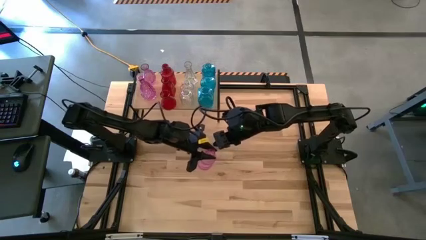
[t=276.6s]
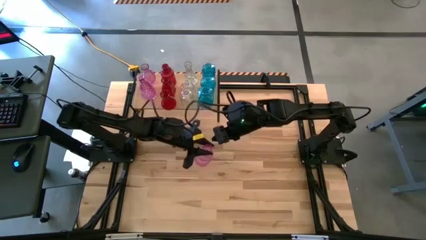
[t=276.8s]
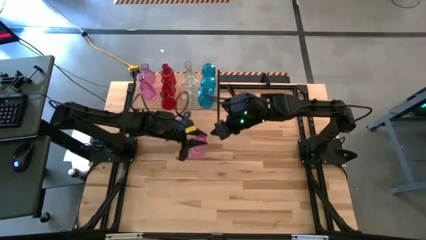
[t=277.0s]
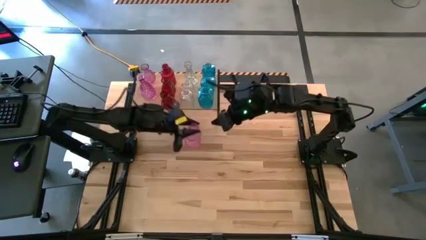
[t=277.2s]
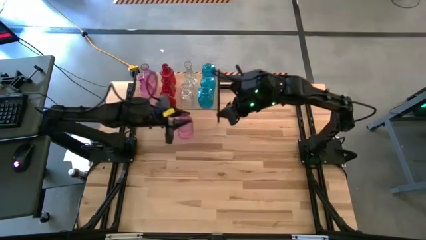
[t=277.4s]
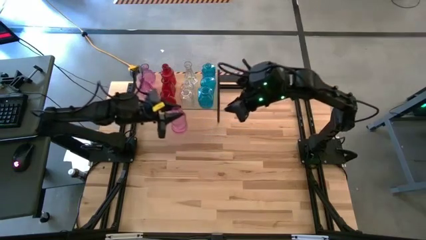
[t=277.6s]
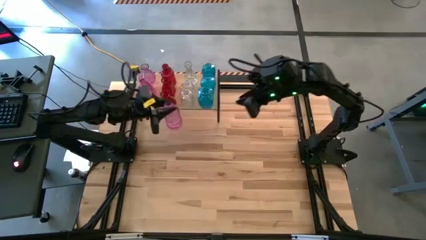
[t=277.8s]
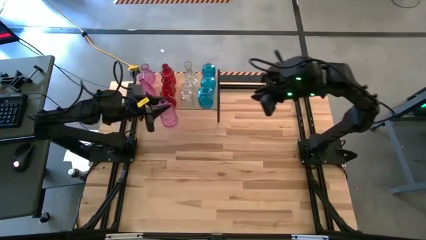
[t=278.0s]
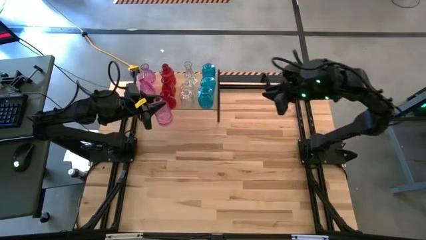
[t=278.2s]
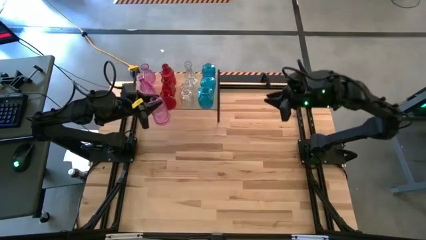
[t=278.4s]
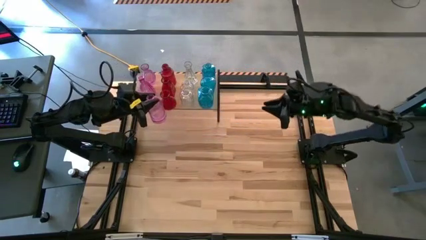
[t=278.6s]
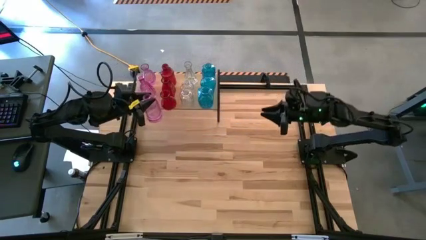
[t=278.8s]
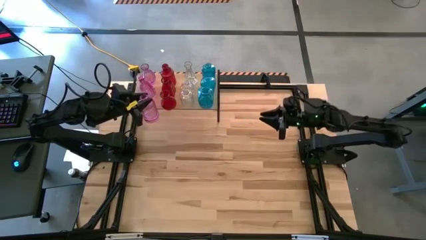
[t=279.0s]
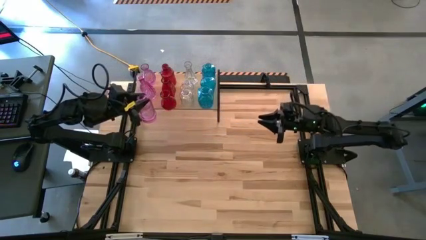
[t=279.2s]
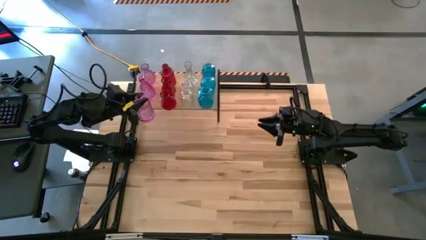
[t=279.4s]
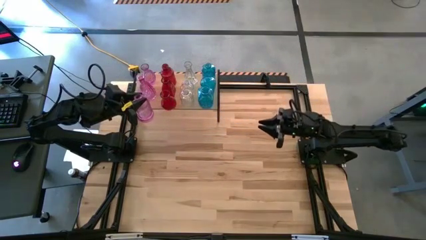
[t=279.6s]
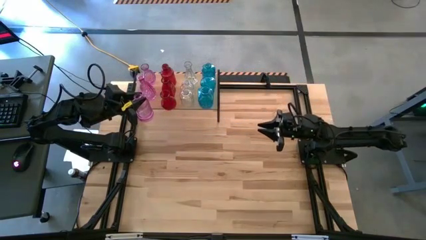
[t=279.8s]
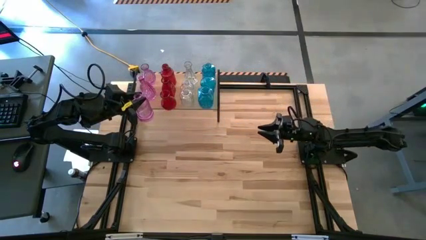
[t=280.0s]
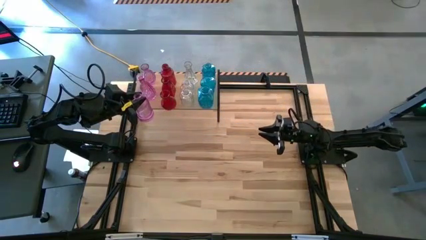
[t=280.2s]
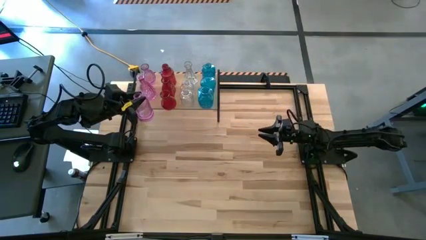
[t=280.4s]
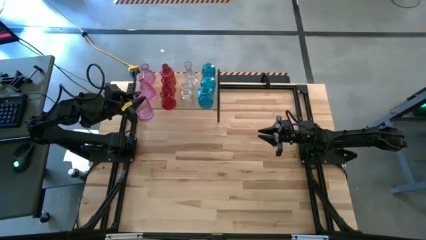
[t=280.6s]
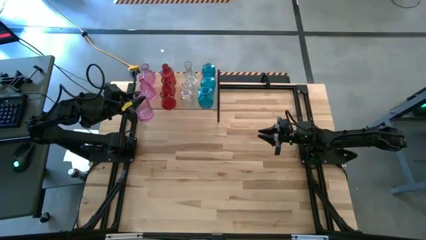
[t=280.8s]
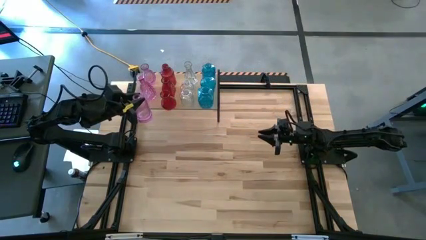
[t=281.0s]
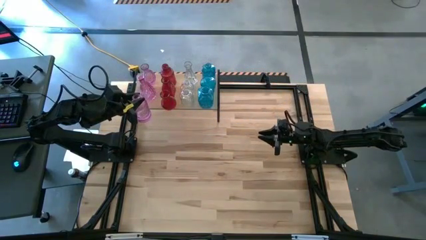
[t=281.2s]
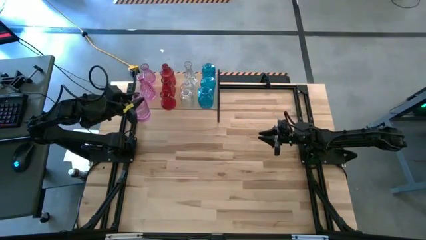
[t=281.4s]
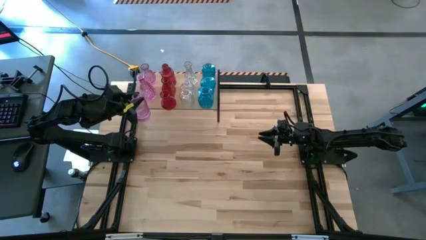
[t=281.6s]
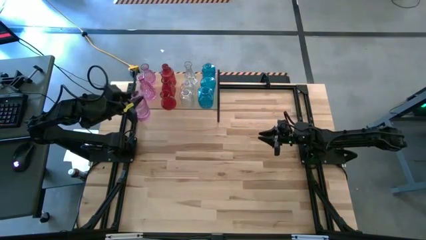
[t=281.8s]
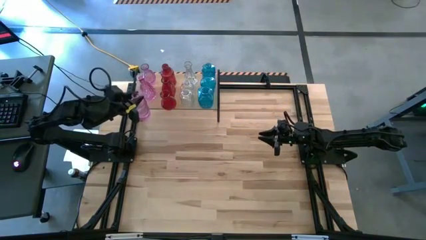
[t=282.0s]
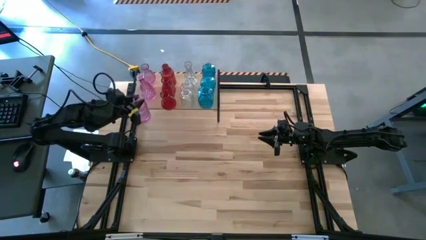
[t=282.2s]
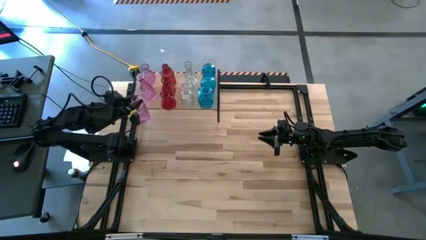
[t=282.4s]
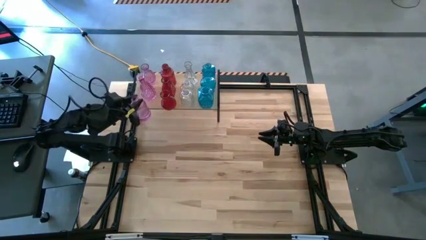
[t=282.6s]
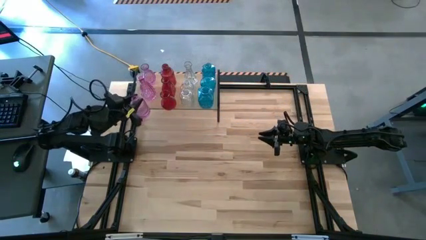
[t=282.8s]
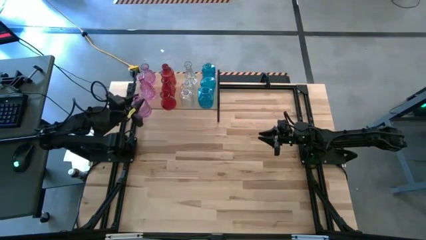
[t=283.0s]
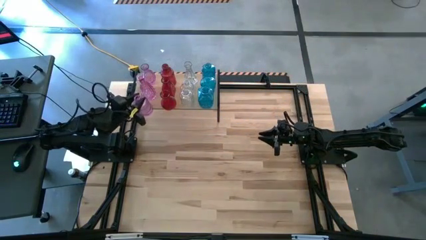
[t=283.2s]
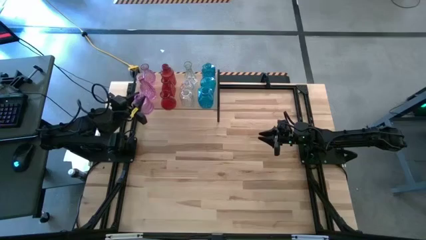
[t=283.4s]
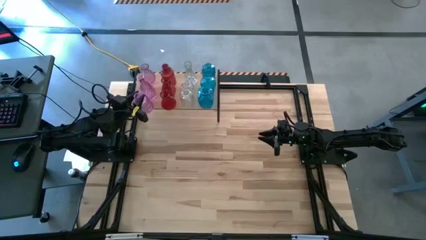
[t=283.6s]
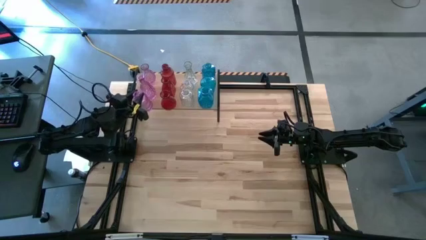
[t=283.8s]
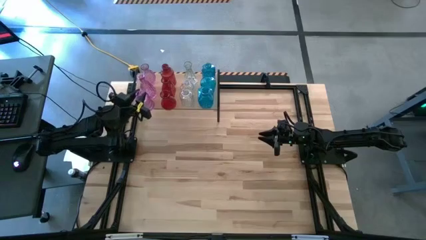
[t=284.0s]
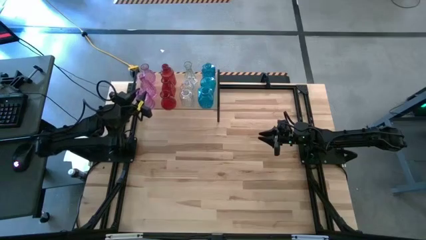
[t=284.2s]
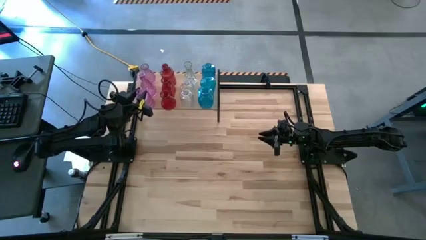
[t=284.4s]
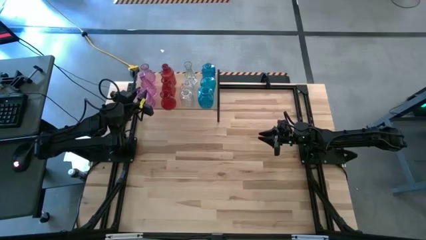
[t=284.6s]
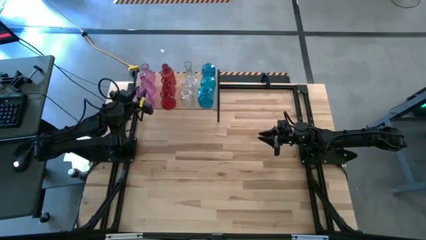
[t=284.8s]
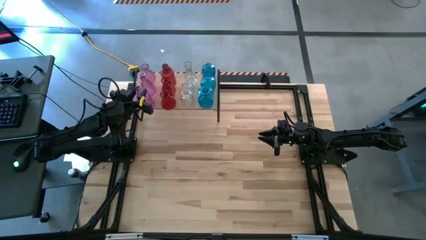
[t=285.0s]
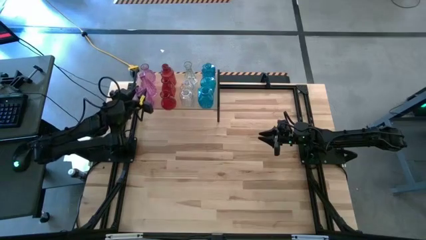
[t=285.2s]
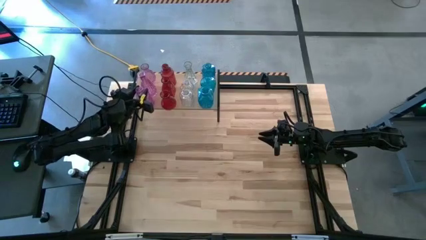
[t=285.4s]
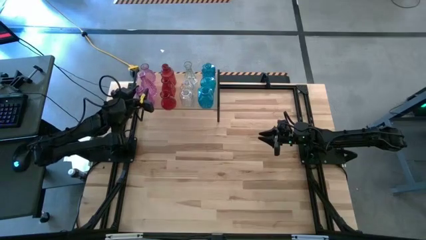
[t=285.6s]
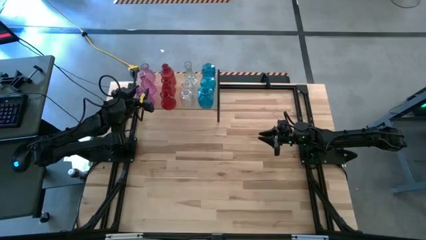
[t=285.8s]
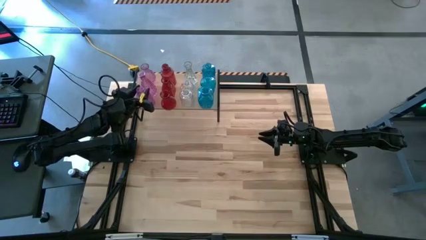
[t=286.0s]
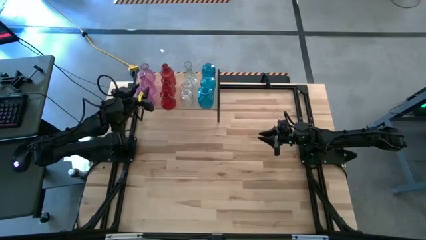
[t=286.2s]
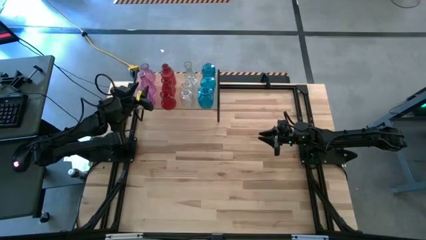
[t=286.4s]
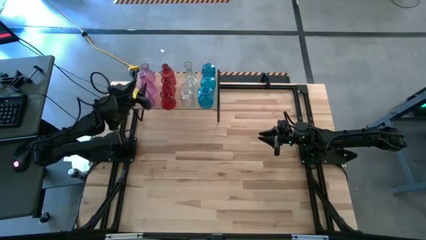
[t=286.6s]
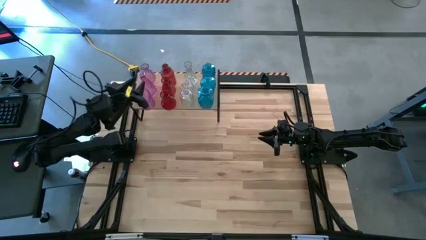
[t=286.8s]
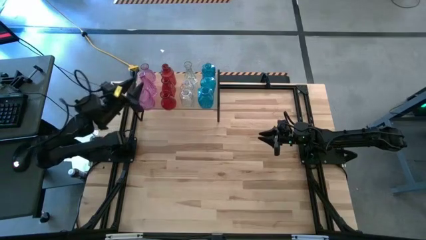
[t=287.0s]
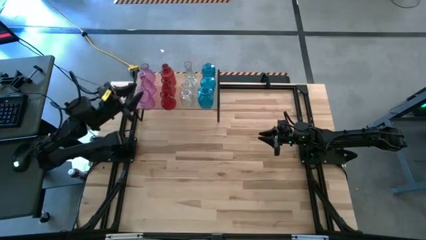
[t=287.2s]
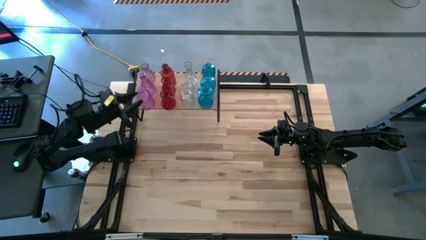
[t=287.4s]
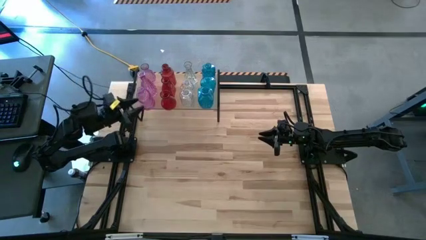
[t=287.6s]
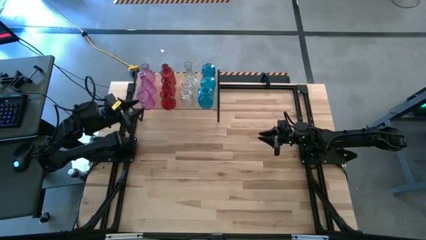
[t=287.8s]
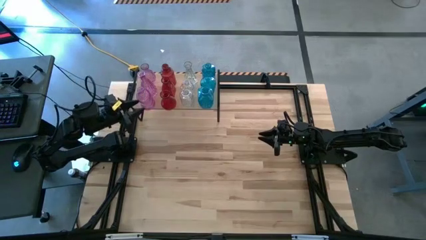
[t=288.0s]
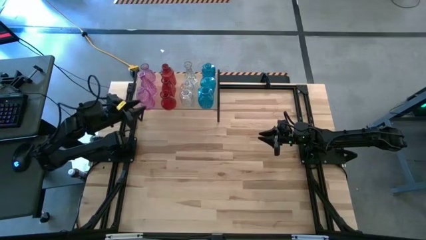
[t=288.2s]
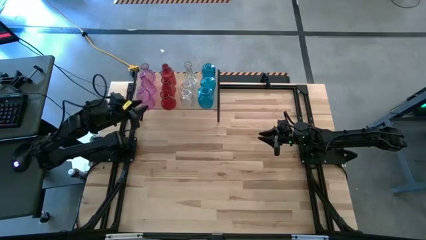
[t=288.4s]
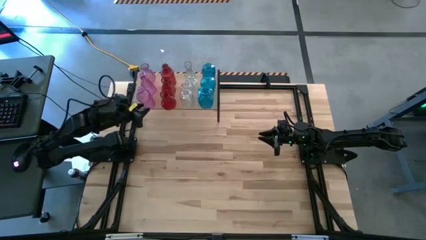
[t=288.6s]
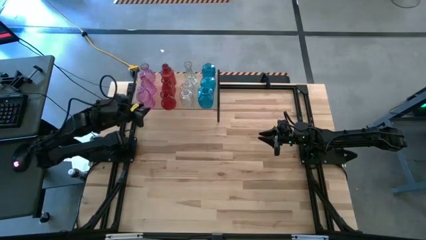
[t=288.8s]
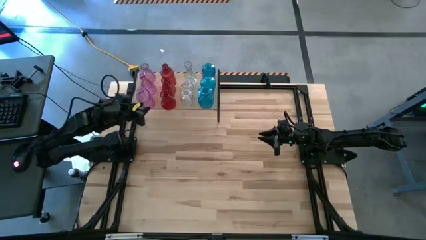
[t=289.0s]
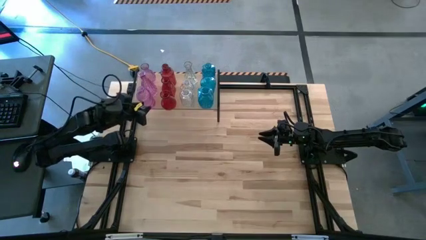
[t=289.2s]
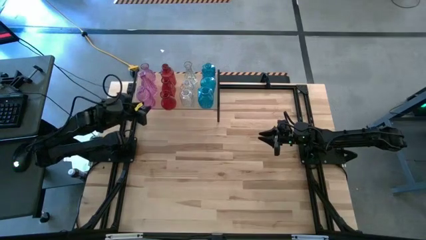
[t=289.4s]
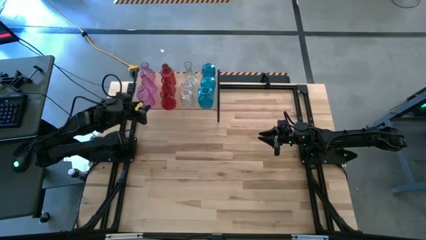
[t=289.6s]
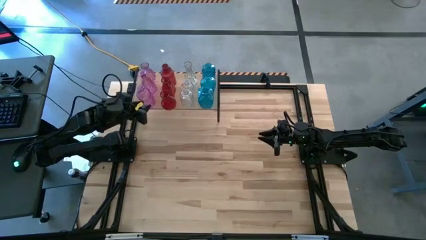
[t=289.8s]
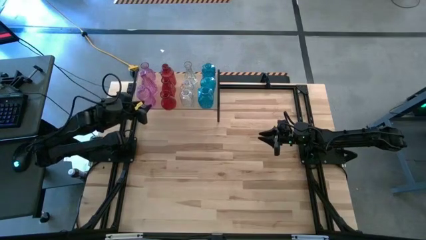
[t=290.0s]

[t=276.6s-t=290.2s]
Task: sort vases onto shelf
Put the purple vase on the shelf aligned with the other purple vases

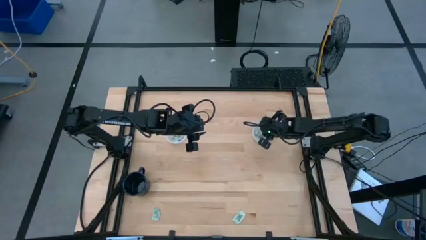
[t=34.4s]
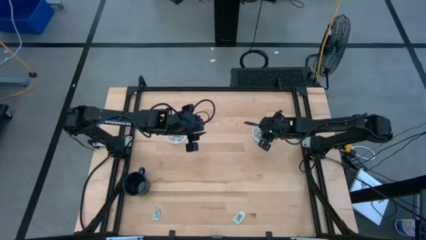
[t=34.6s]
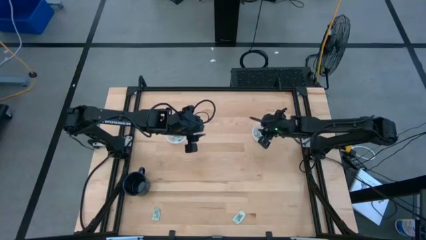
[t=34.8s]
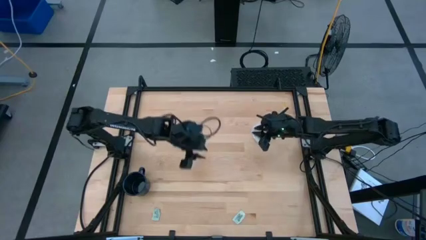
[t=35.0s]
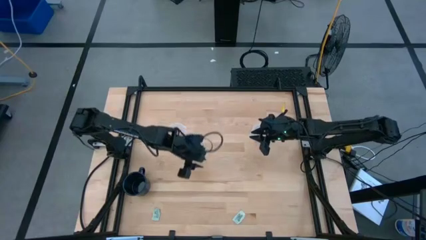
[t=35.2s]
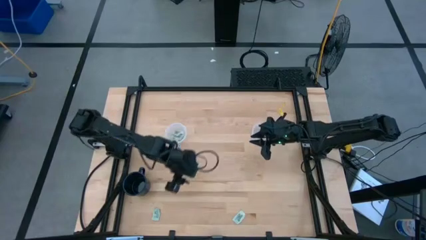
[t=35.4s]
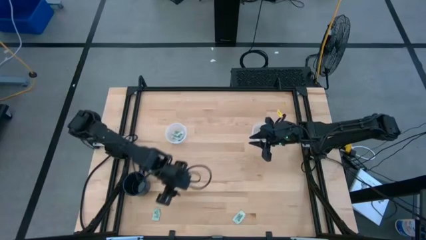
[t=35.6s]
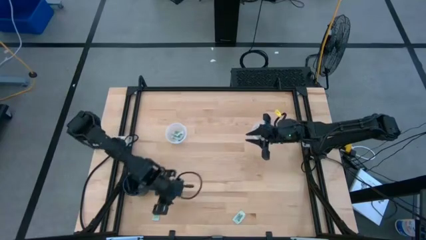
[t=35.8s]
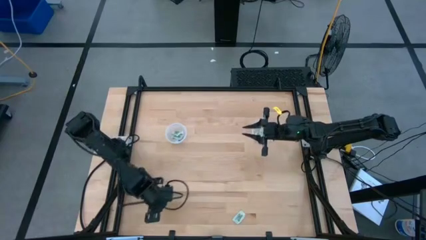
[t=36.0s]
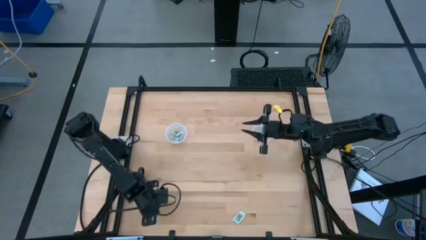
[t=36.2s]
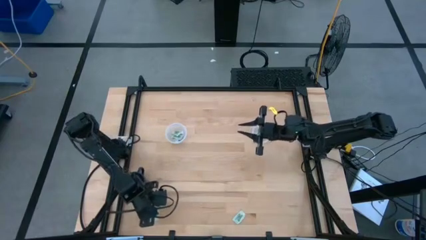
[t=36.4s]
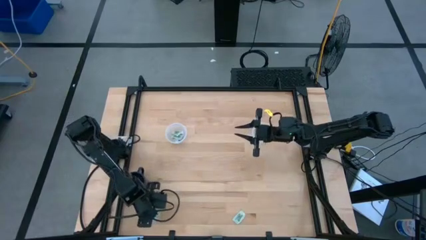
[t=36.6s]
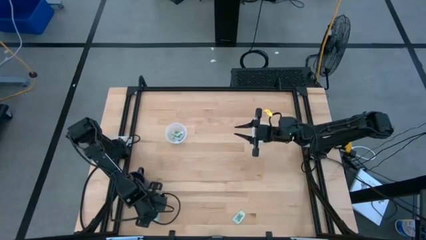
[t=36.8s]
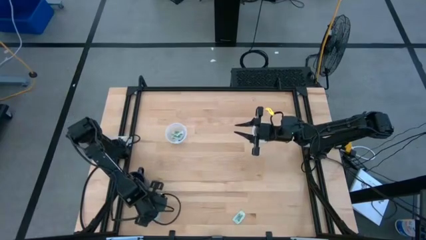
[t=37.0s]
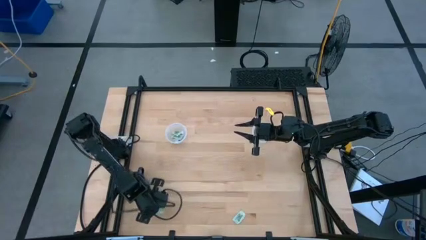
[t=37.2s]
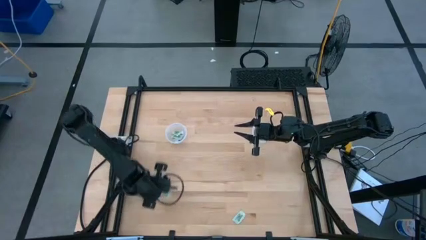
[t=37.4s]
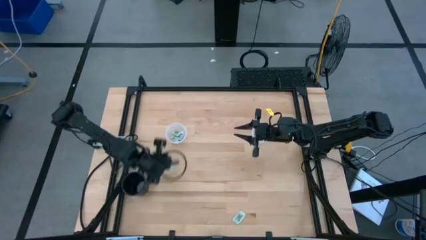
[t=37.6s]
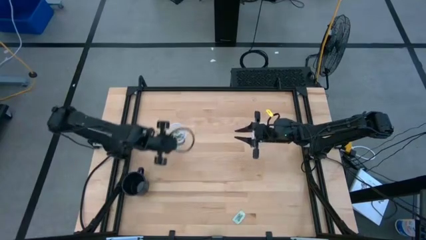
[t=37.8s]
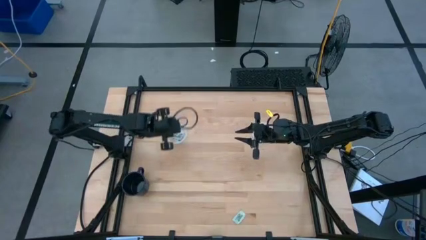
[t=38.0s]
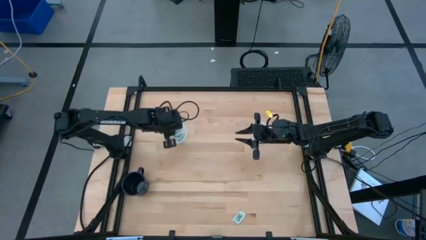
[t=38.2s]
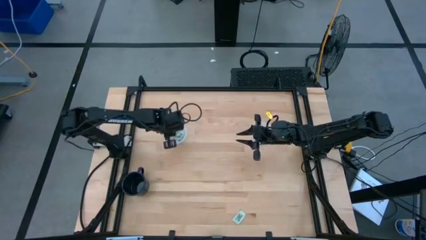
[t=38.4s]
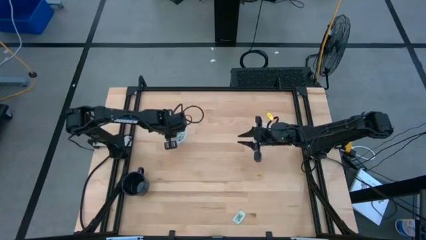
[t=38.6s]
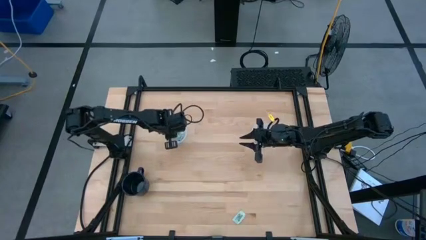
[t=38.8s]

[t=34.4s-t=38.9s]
Task: Pick and place Stevia / Truvia into bins
Put the stevia packet into the left transparent container
